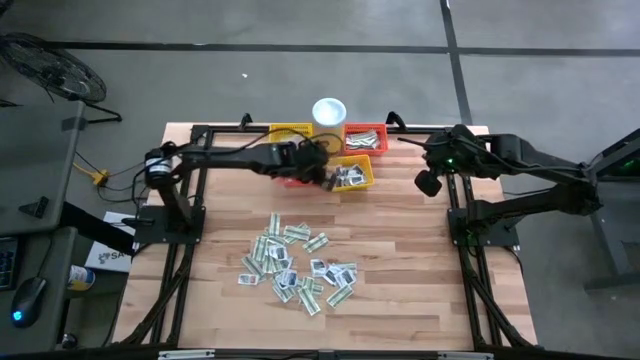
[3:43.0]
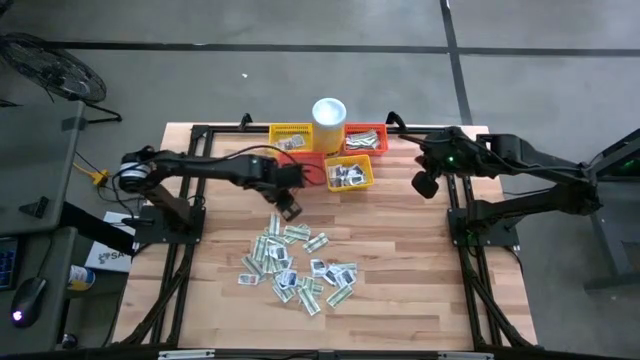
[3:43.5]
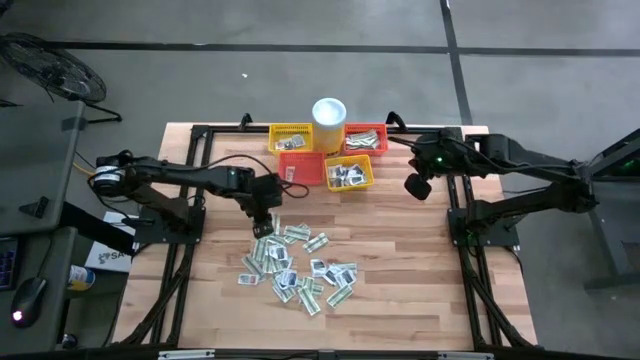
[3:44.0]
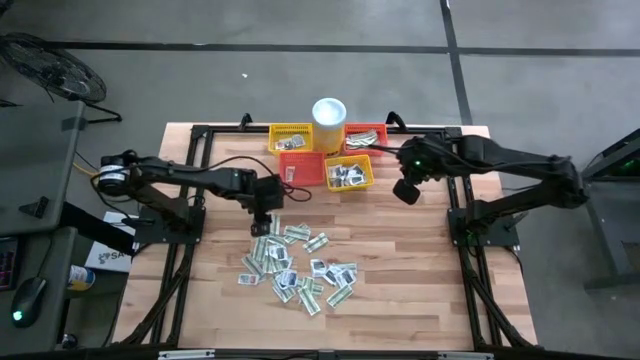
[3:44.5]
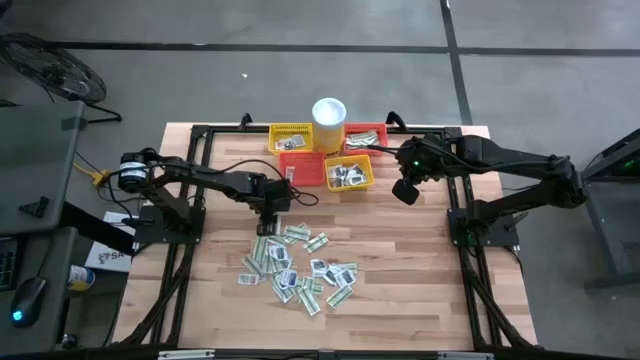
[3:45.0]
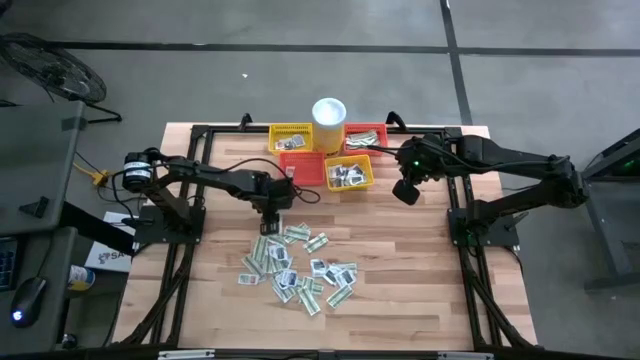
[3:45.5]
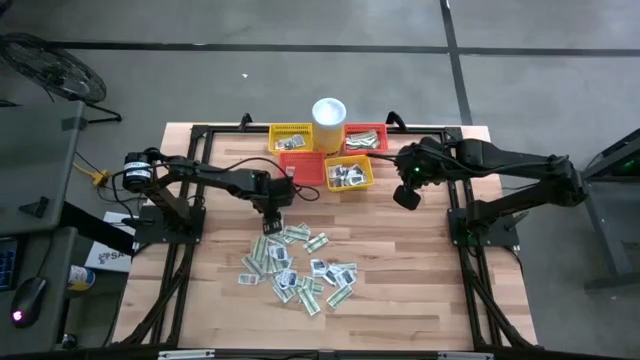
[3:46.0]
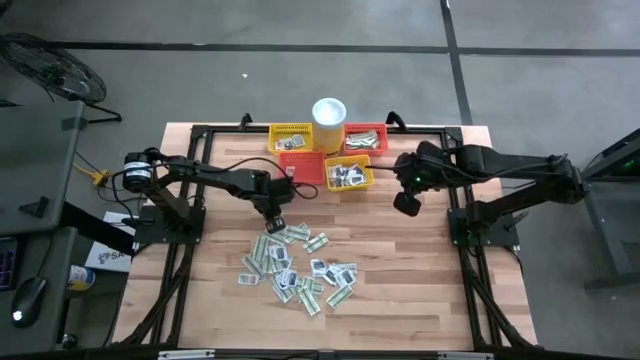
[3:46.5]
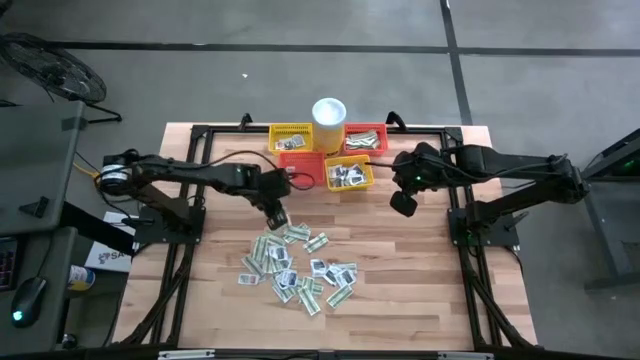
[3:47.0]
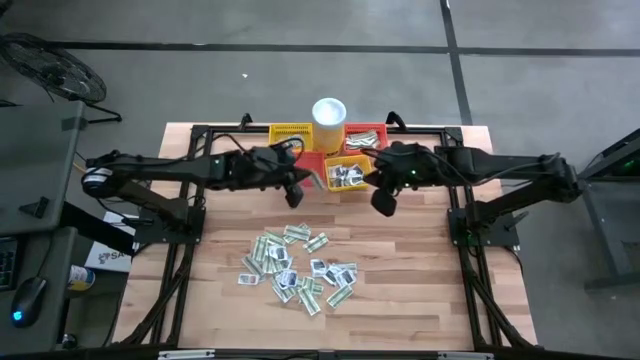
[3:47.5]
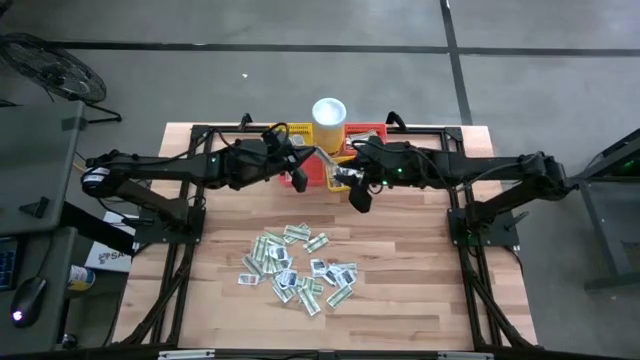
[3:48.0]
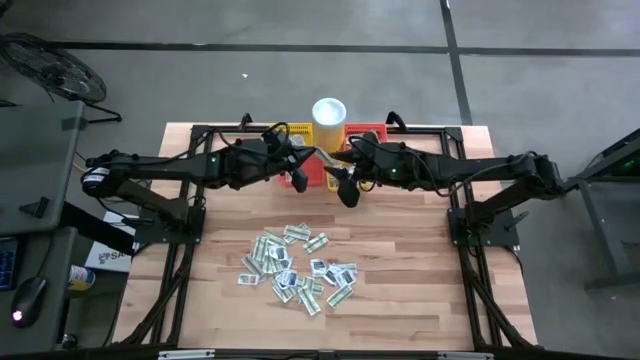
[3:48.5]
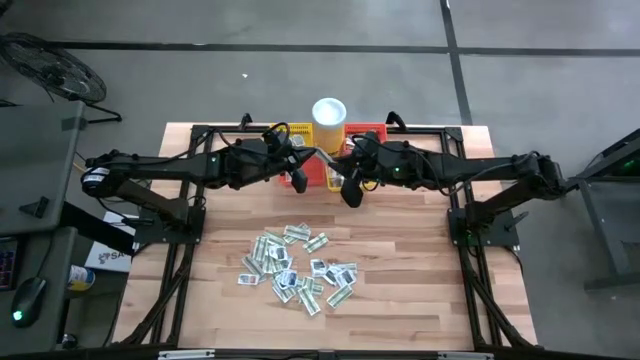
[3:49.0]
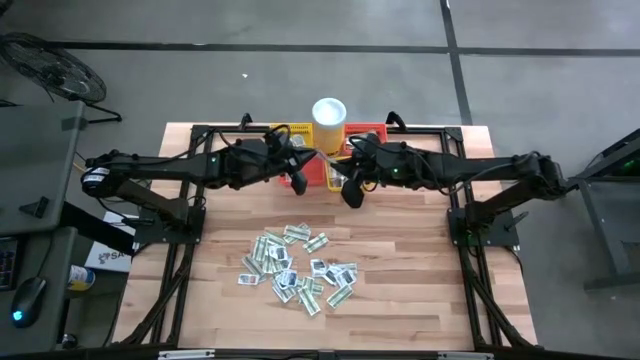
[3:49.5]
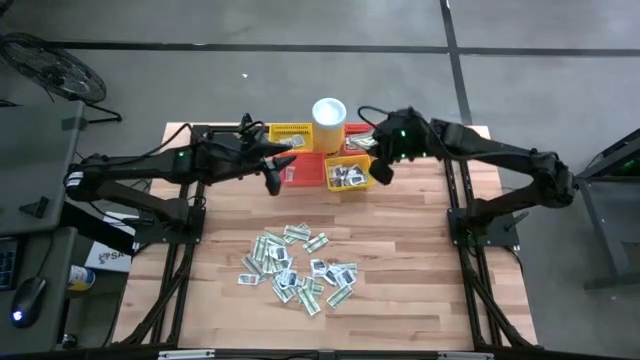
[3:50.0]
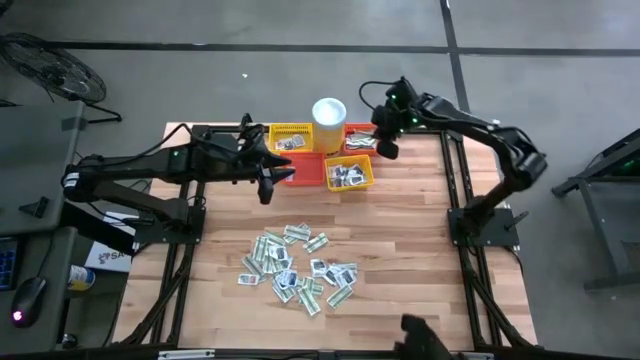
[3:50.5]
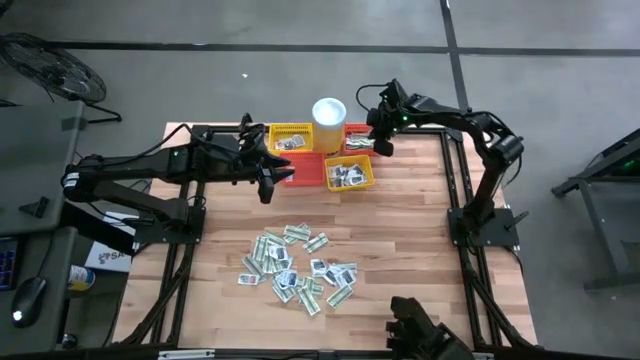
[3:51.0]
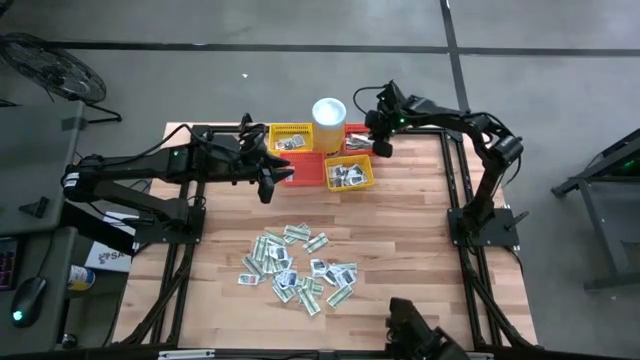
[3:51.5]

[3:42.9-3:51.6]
Task: Pick & Place First Aid Supplies
Put the green bandage pack into the top orange basket

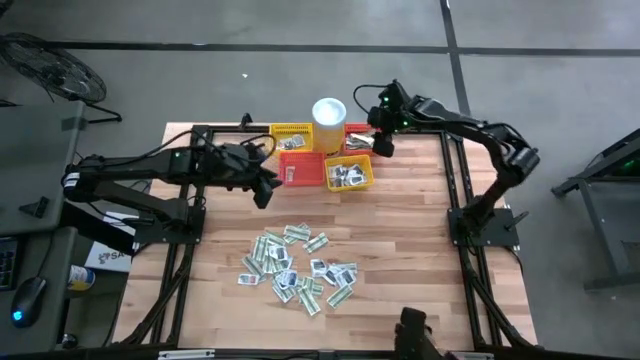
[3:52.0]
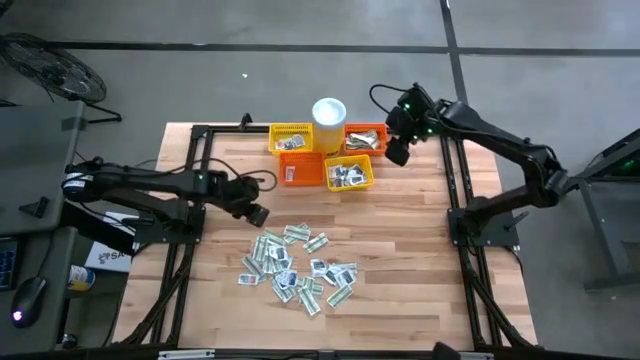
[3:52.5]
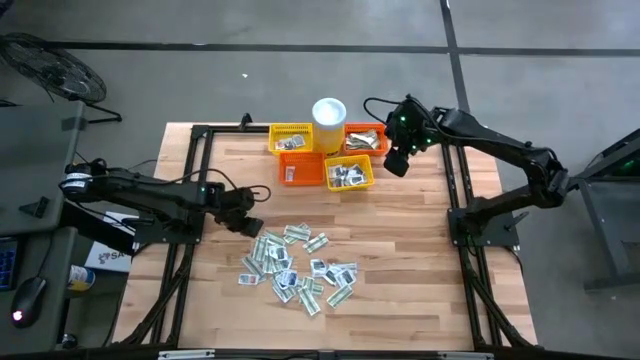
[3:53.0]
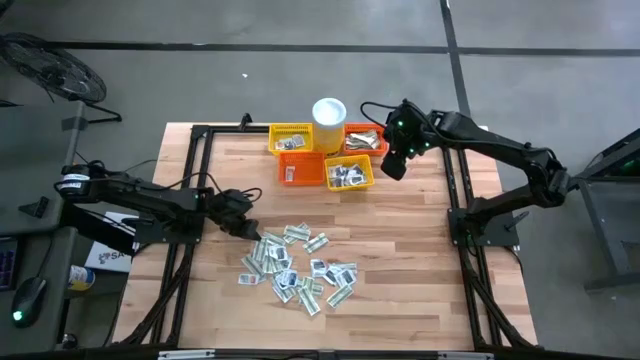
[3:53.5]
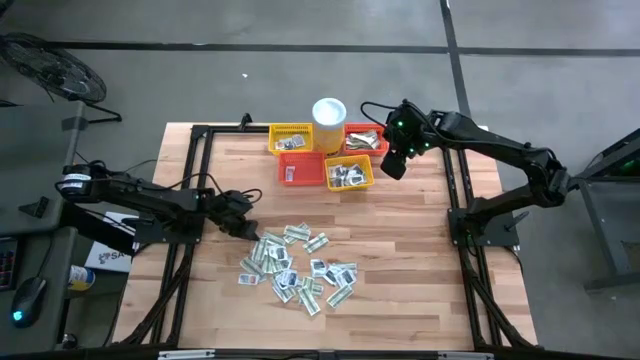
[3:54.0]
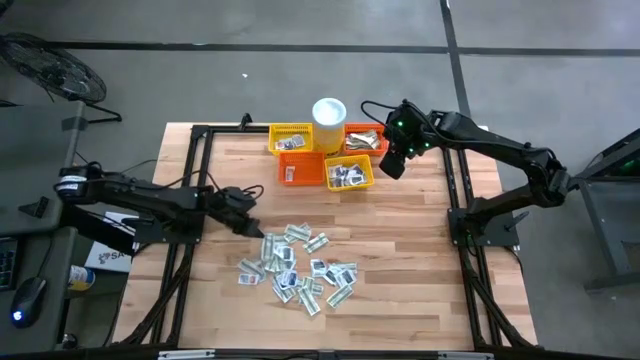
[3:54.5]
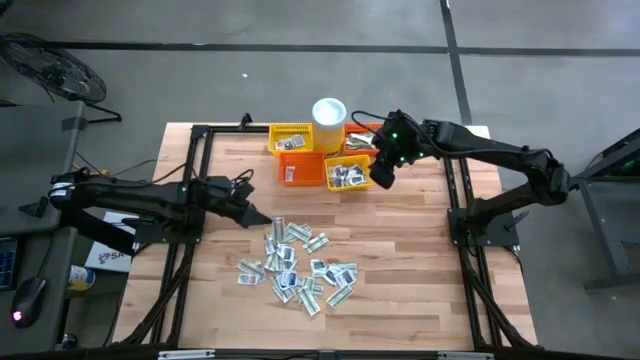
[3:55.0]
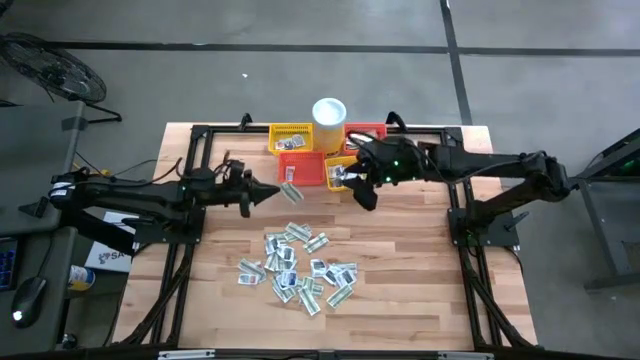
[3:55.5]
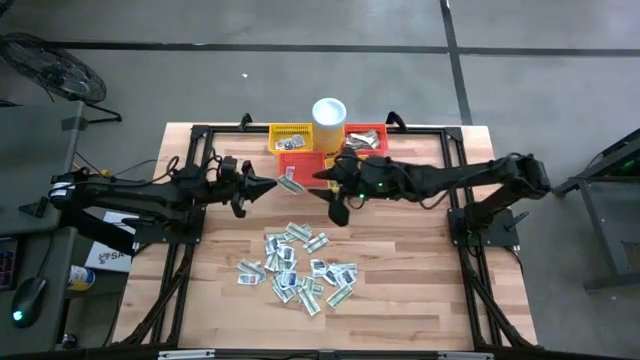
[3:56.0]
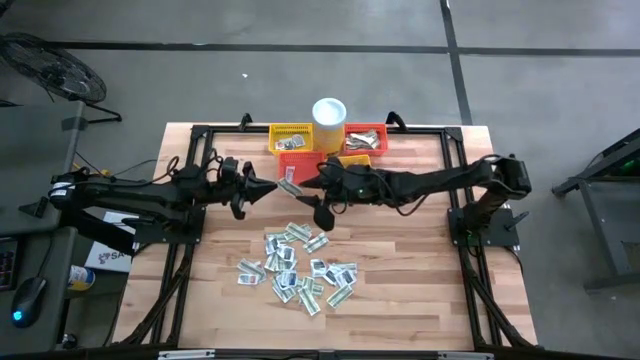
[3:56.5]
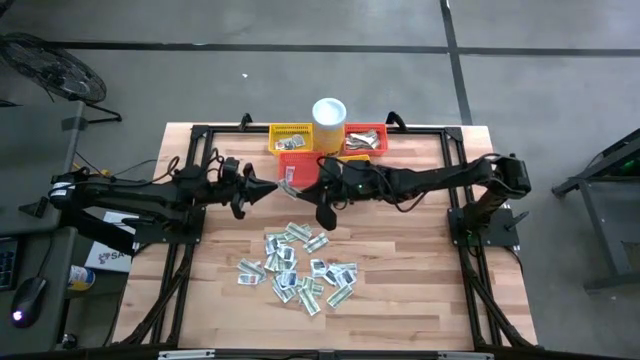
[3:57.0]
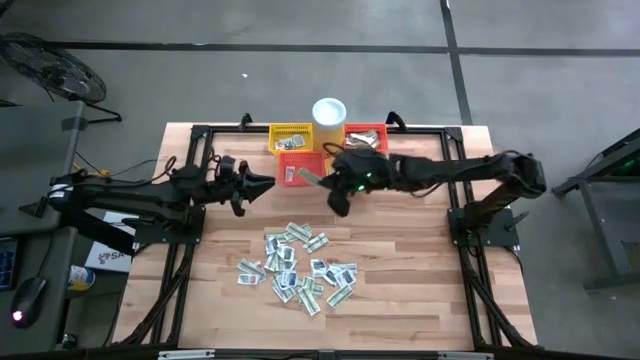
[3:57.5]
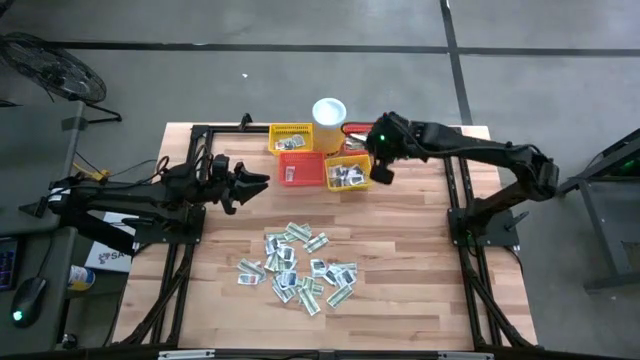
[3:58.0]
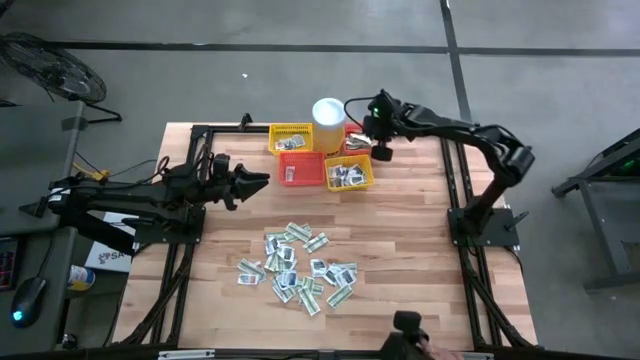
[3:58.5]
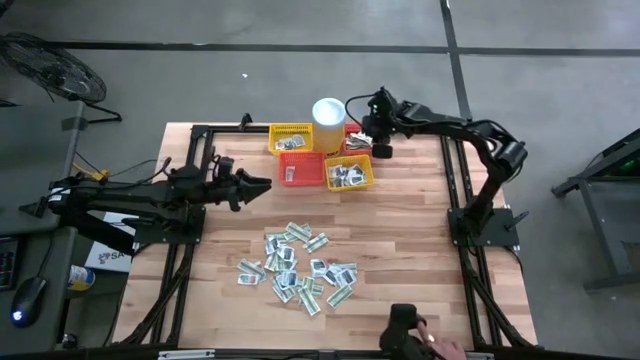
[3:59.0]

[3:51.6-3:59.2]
Put the green bandage pack into the top orange basket
